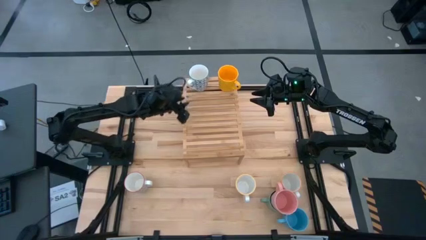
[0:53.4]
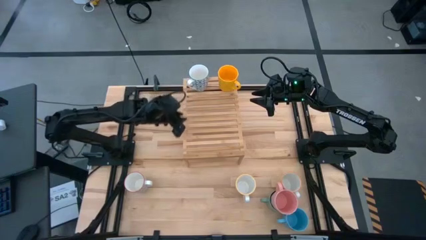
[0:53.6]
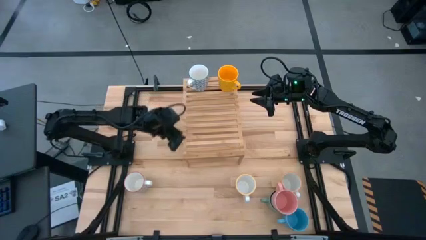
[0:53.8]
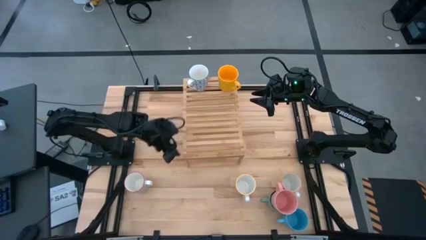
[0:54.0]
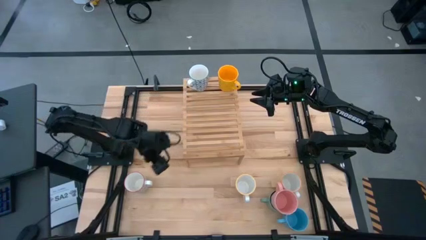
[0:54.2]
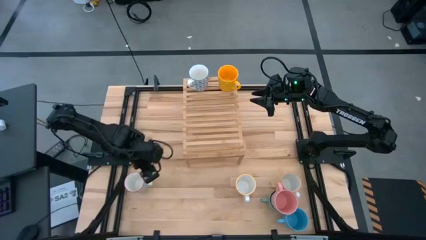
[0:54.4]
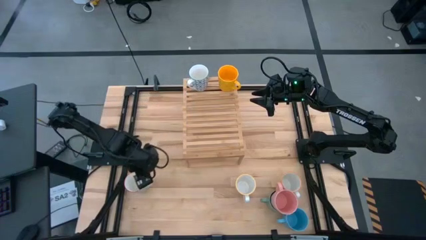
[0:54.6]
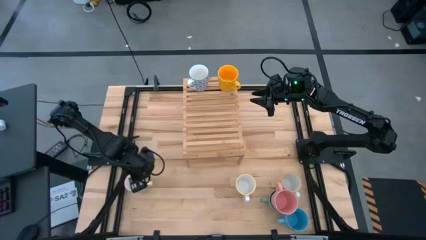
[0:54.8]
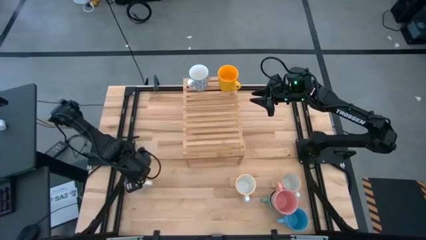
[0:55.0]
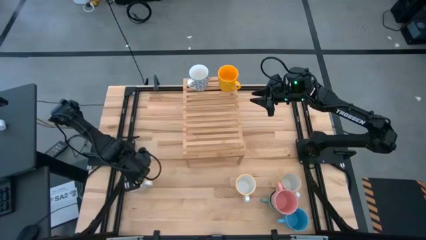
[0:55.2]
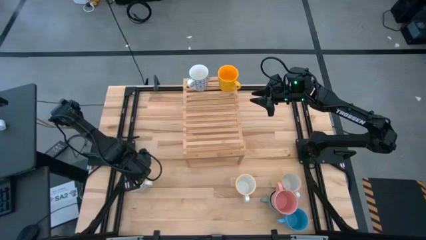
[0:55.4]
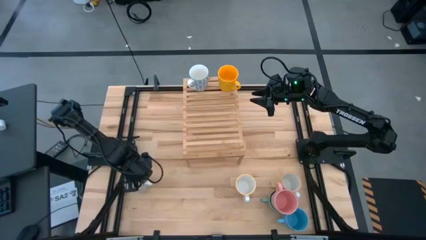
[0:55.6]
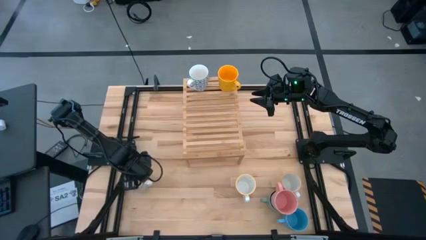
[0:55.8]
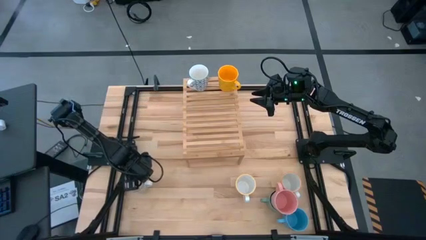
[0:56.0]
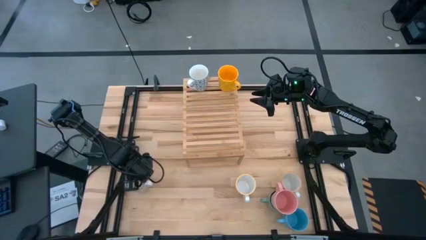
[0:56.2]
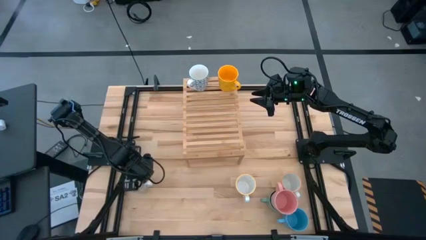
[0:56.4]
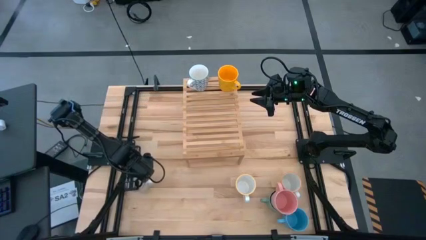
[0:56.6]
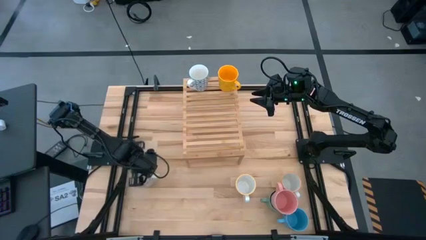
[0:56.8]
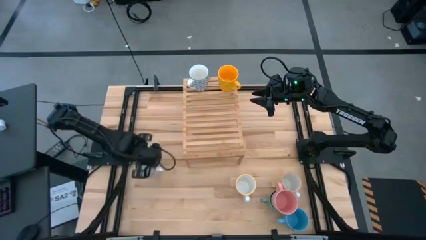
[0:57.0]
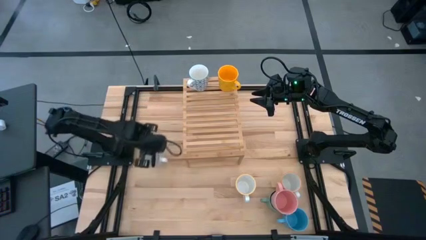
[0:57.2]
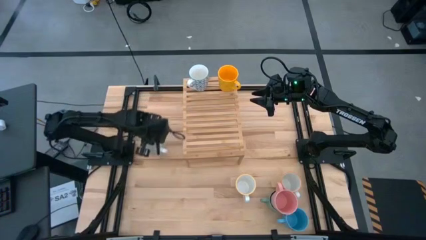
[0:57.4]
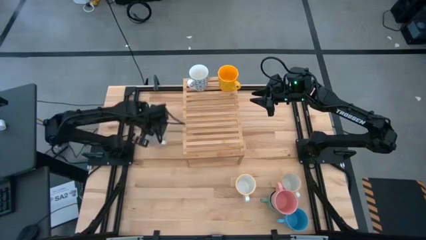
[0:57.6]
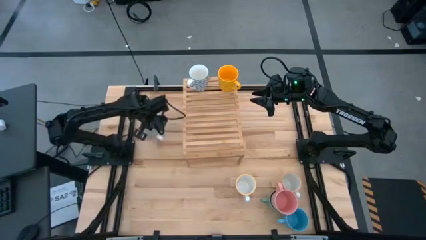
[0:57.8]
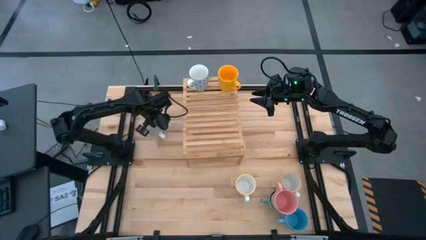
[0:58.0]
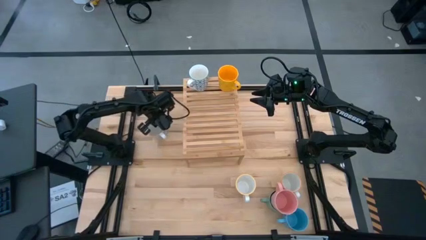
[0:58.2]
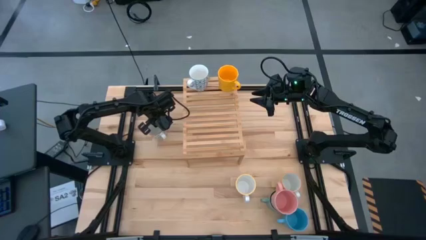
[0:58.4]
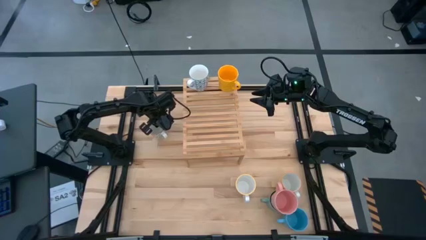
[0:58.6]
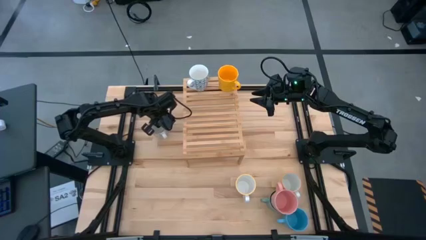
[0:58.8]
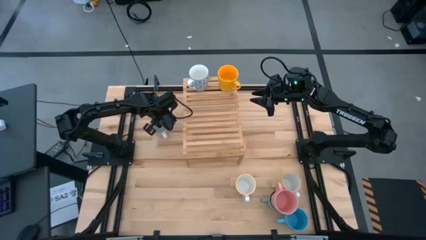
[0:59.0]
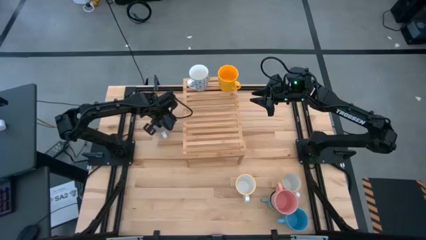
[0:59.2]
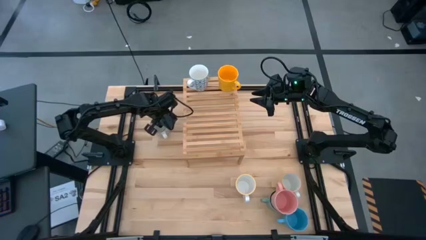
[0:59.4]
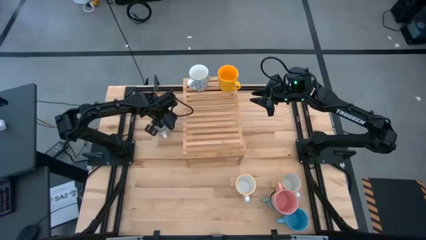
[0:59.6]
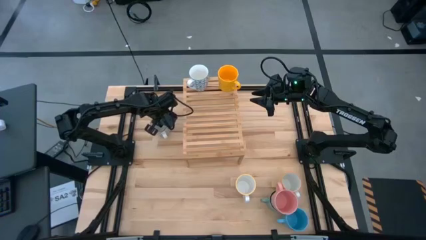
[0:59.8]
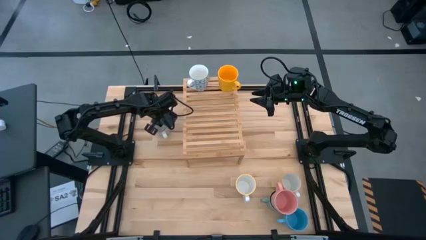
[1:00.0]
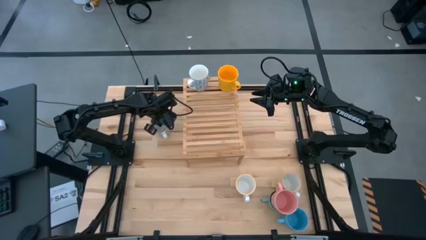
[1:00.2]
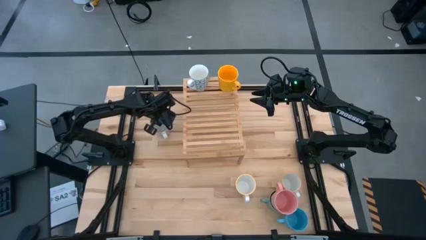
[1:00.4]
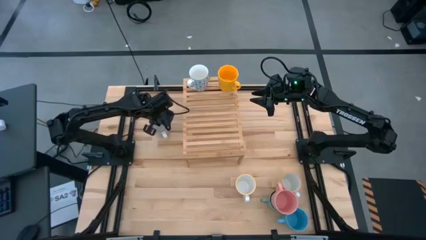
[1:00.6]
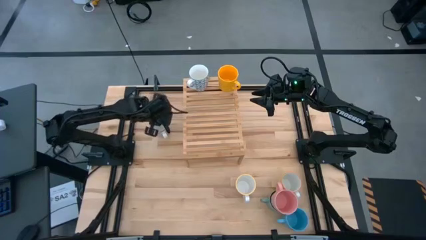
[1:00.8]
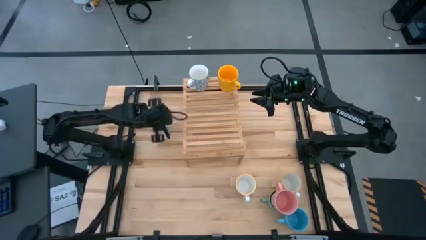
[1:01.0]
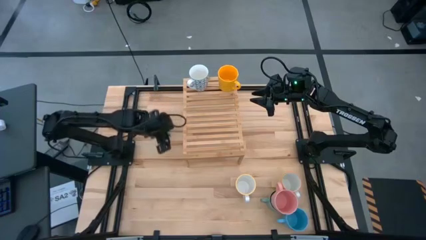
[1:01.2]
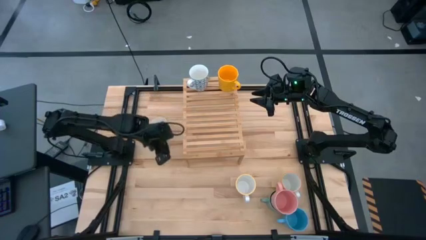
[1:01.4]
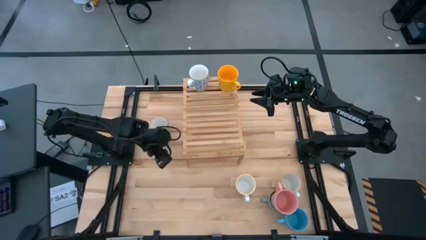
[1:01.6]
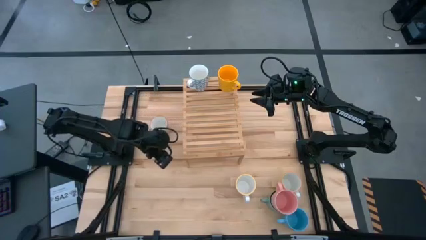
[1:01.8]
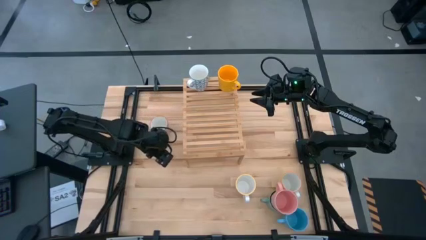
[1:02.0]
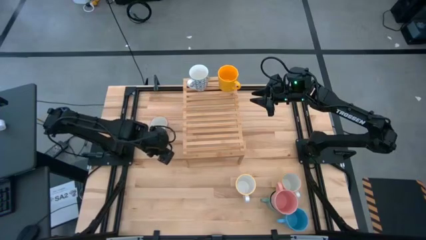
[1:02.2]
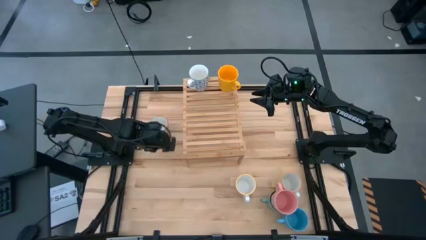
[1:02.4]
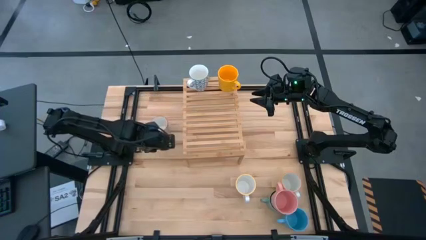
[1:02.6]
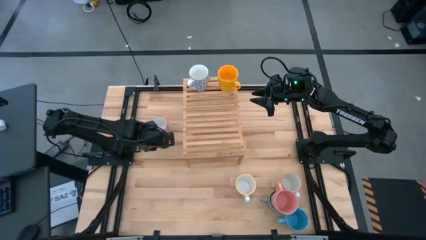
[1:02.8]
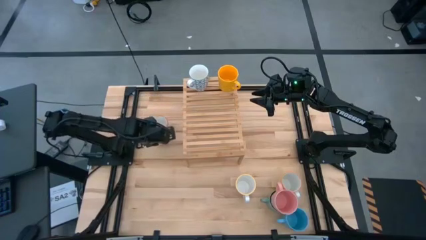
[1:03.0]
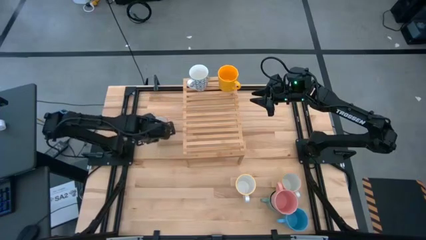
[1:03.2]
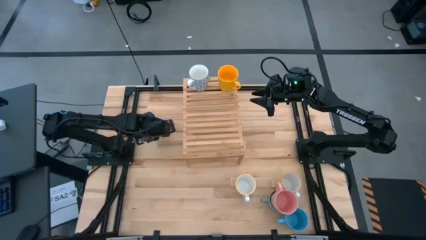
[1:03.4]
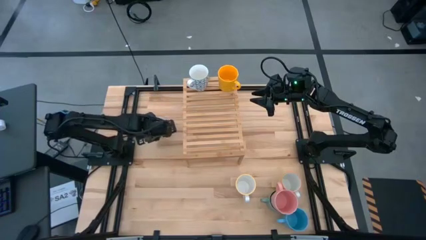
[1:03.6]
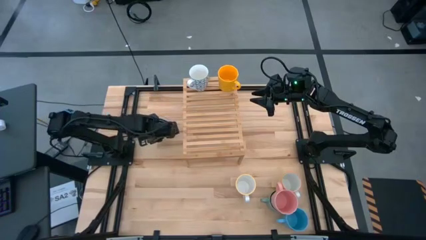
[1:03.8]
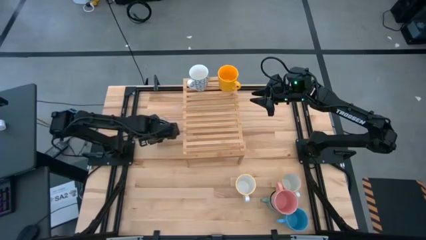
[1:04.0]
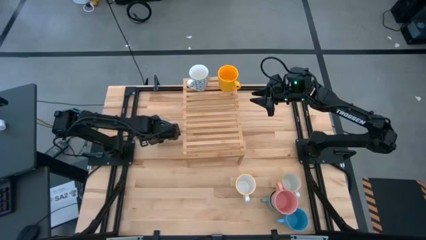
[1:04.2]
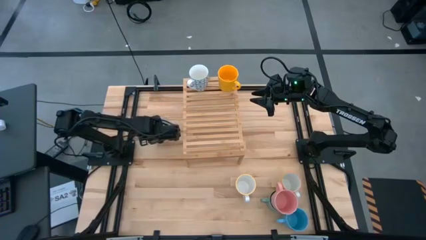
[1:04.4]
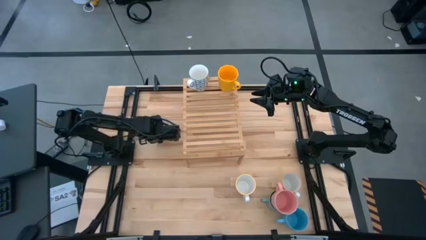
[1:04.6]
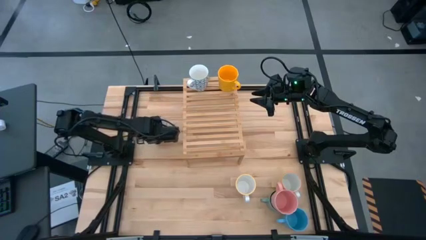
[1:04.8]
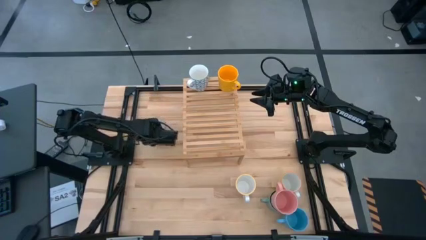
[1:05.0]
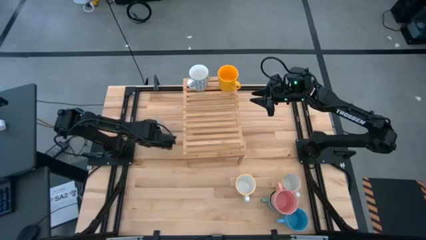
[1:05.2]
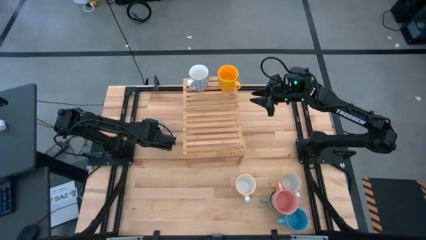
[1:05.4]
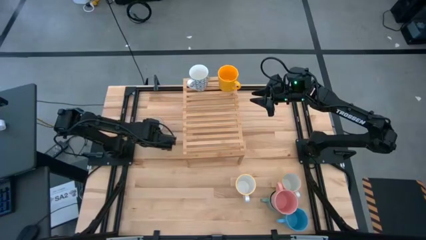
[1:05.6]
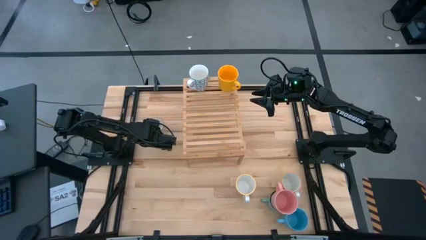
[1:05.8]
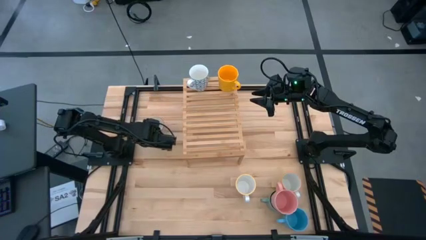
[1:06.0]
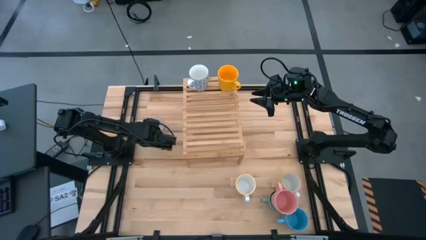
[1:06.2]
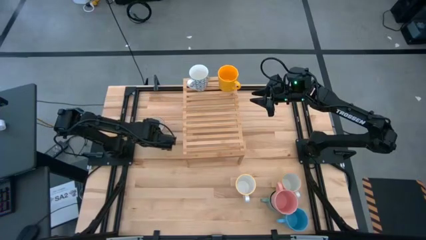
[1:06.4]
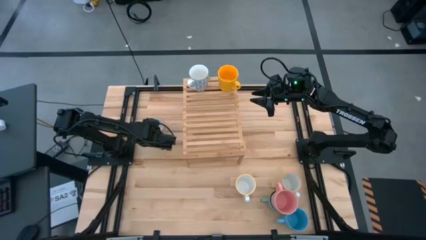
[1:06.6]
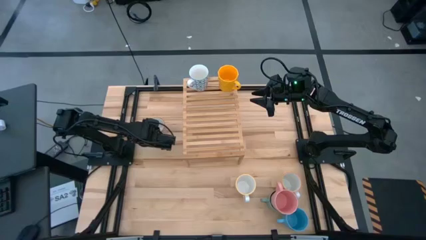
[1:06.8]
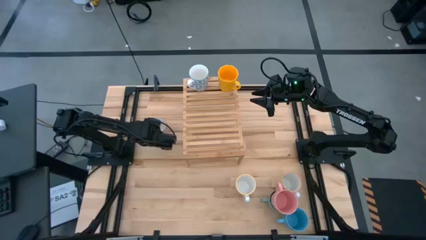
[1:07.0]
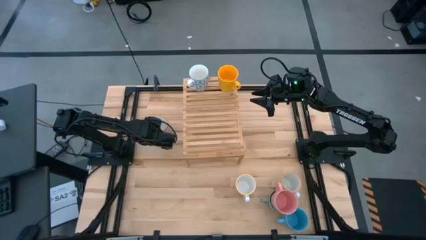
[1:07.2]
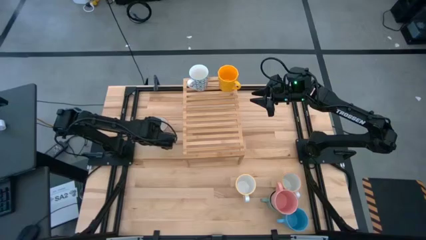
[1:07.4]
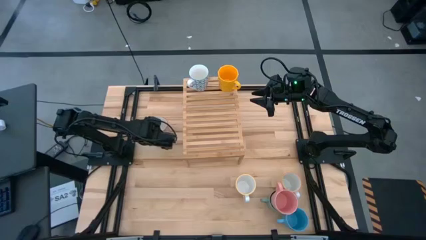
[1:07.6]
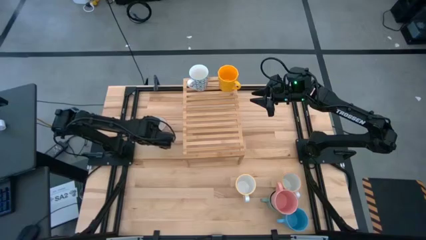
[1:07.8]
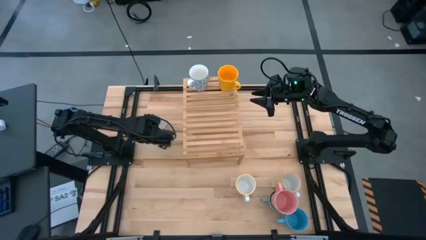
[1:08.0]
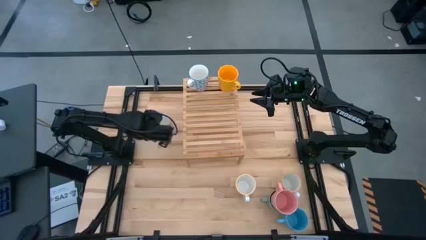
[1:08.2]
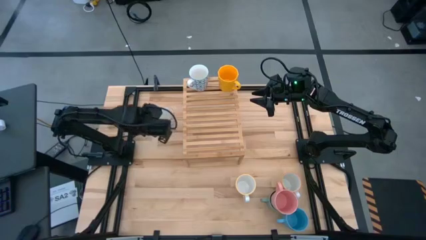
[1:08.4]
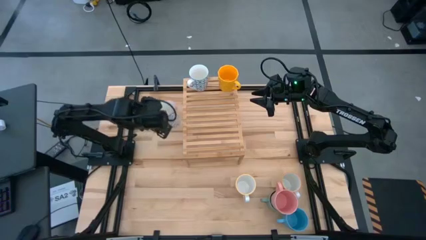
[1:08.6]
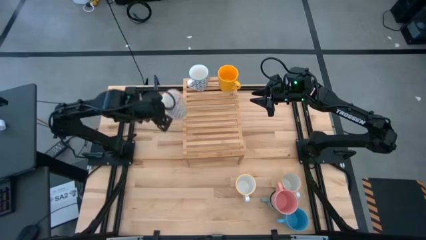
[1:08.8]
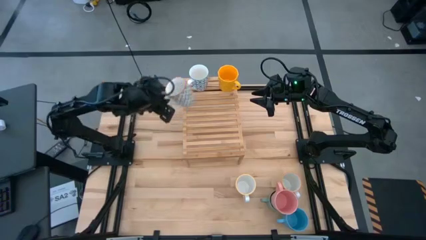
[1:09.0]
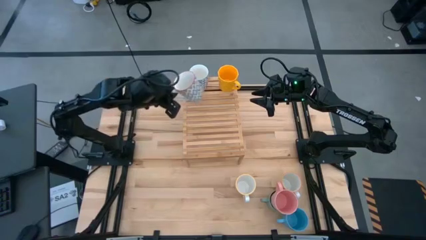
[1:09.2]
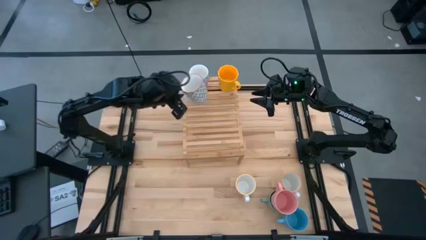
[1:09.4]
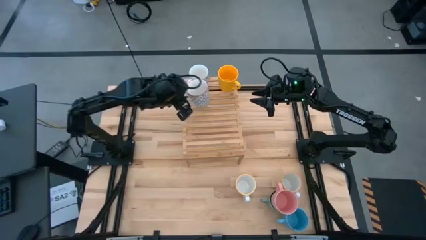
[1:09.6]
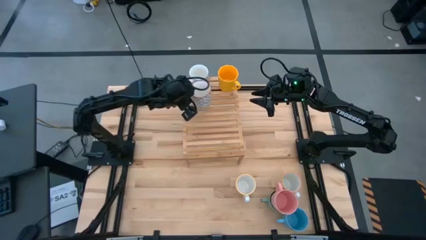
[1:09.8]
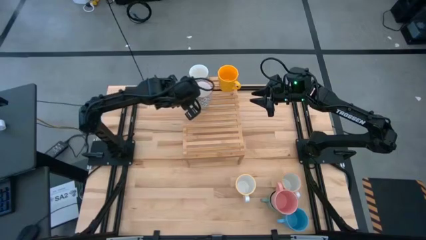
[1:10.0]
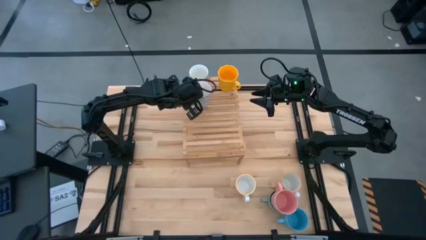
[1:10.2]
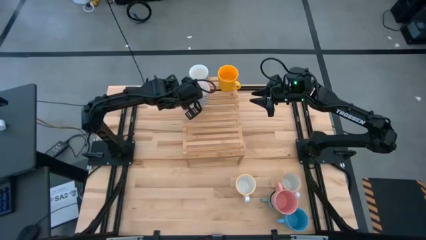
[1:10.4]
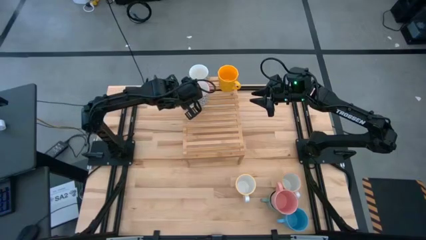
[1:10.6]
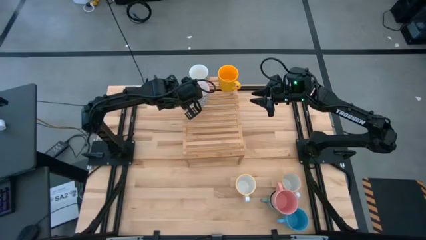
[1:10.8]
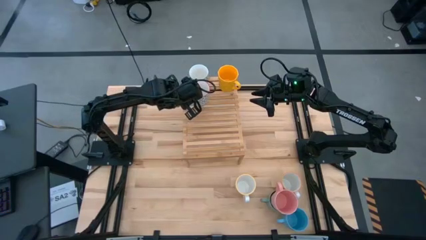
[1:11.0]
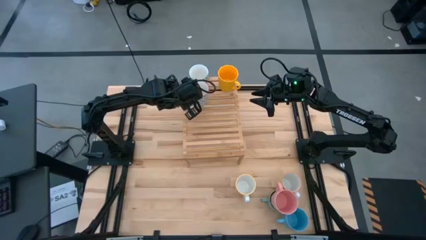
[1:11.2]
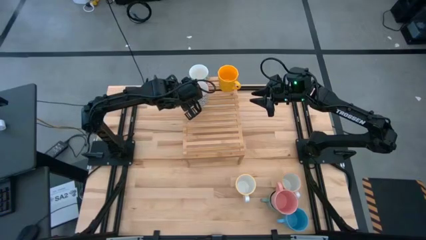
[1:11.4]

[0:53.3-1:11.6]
Task: Place coffee mugs
Put the gray cup on the shelf aligned with the other blue cup
